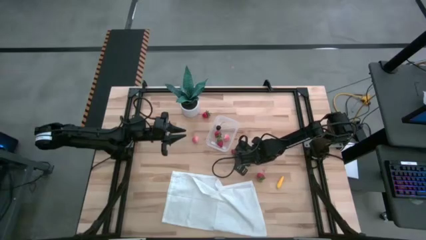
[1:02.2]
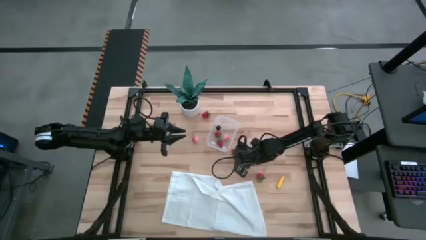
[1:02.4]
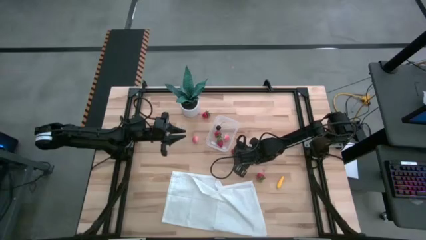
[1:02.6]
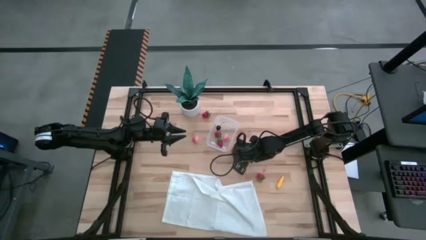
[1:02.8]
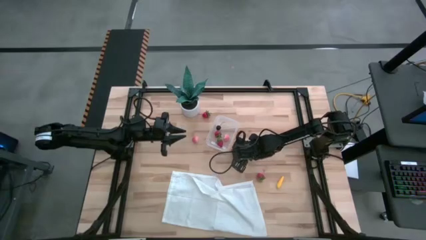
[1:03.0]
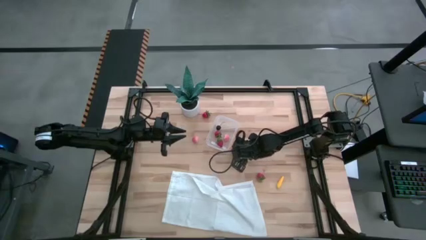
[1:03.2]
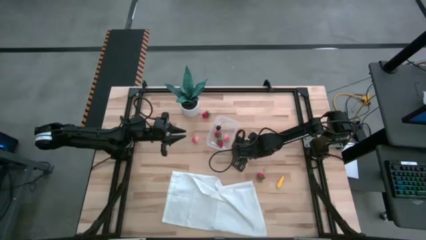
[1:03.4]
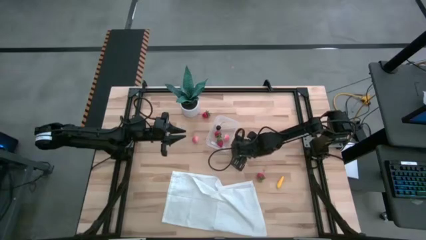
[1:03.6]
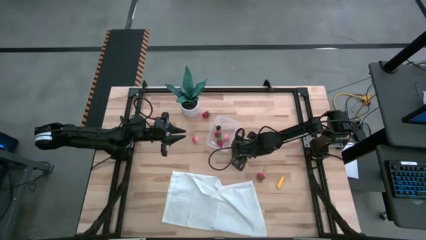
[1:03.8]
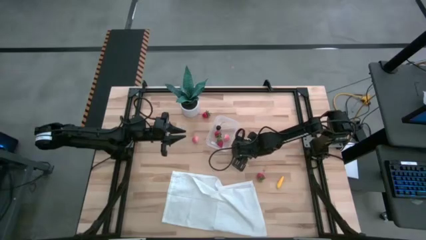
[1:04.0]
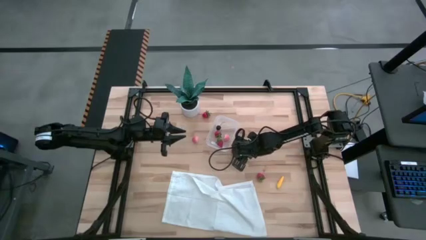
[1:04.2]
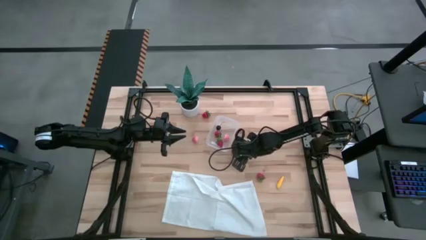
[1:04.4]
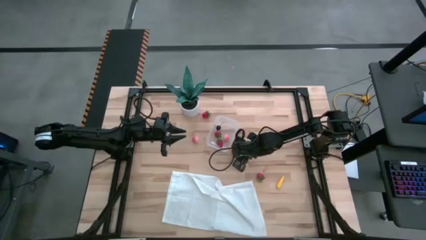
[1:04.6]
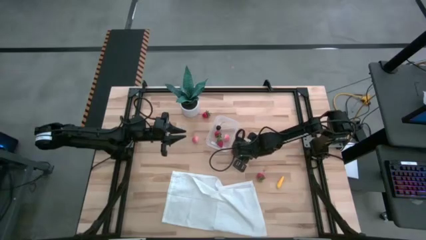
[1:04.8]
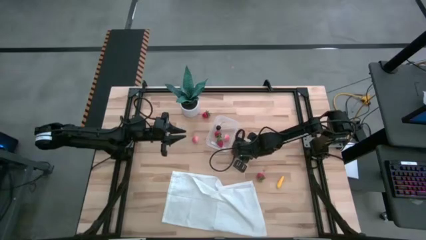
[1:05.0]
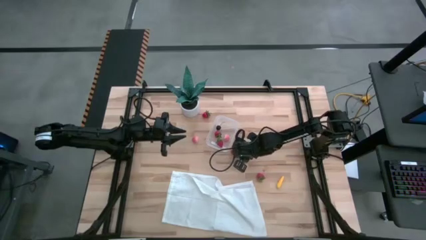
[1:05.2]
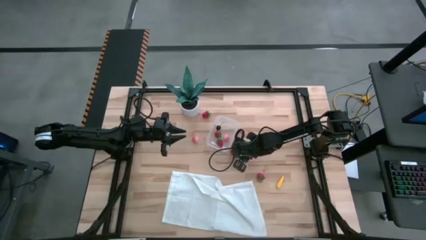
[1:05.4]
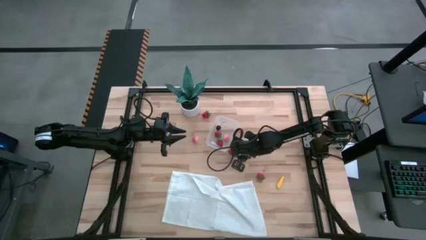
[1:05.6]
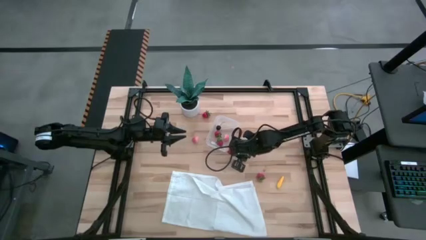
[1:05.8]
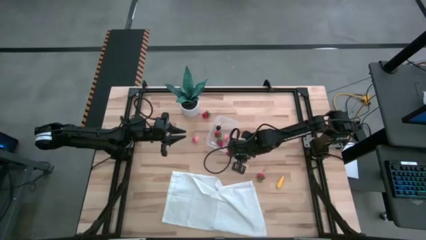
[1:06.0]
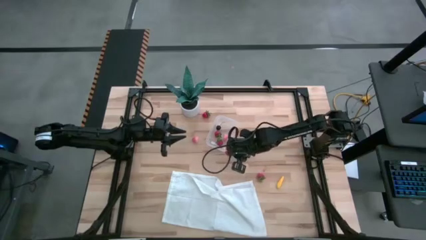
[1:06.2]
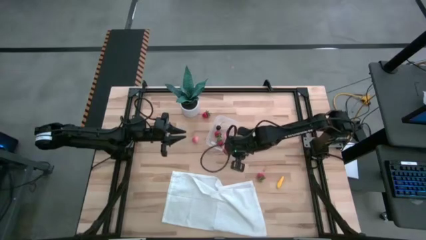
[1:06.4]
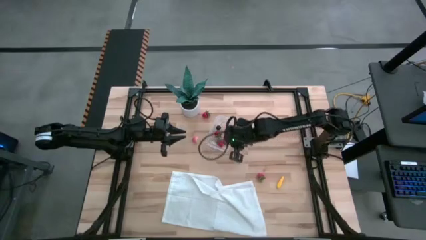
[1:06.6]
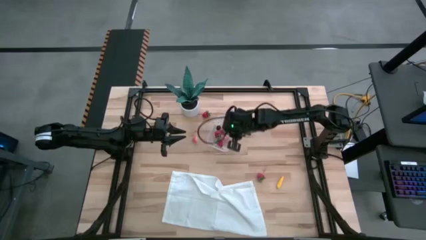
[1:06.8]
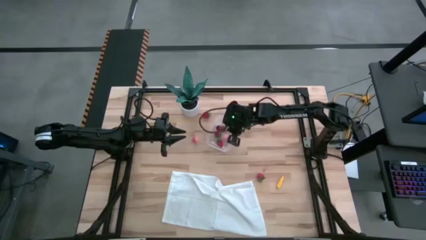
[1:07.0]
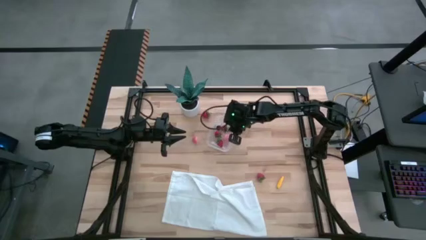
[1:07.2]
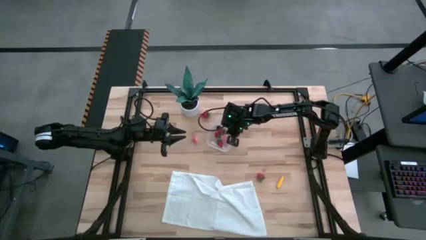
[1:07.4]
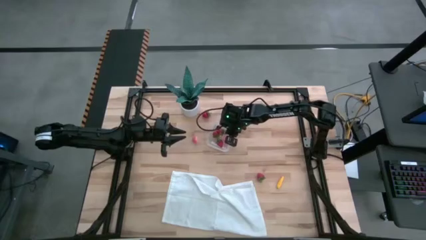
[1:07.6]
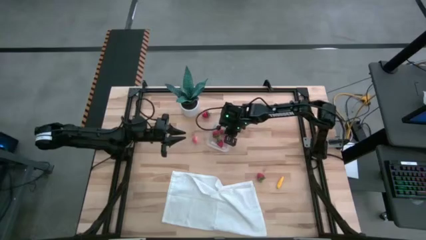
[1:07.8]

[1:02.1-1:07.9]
Task: Pick and placing Produce into tupperware
Put the red strawberry into the transparent bin

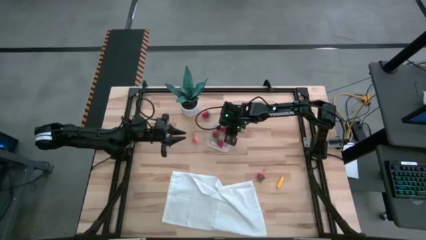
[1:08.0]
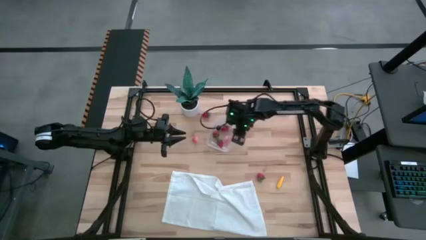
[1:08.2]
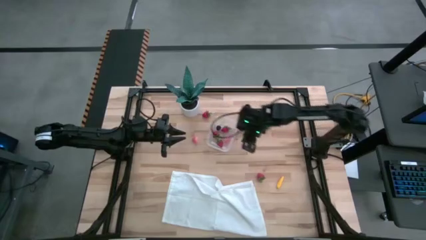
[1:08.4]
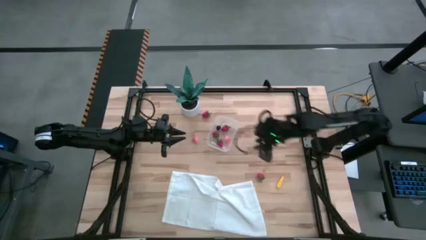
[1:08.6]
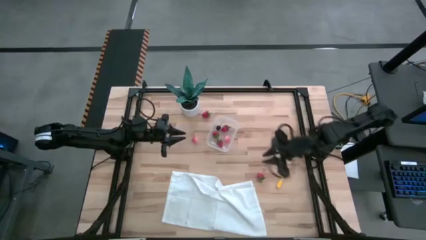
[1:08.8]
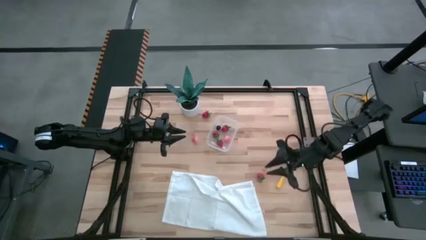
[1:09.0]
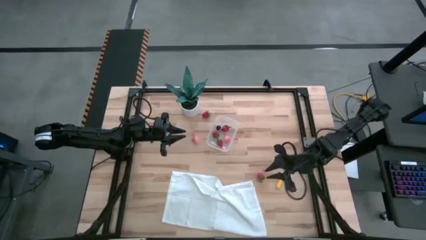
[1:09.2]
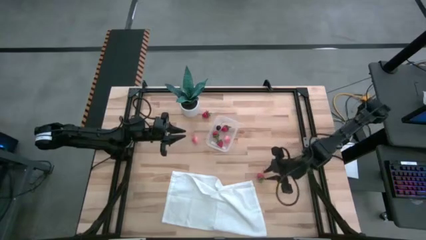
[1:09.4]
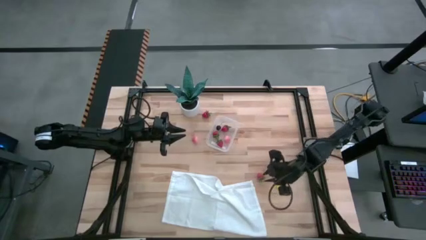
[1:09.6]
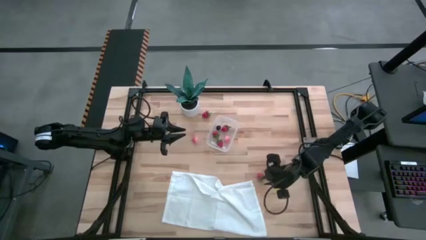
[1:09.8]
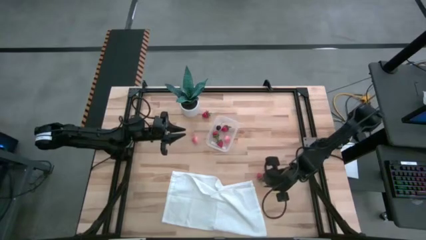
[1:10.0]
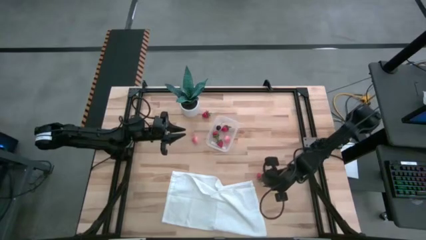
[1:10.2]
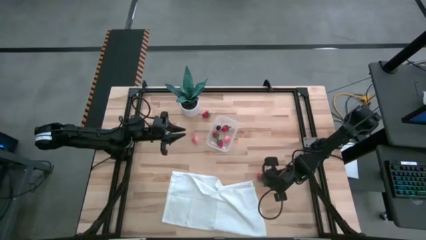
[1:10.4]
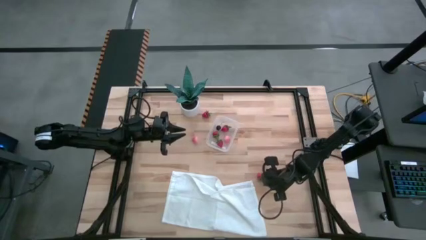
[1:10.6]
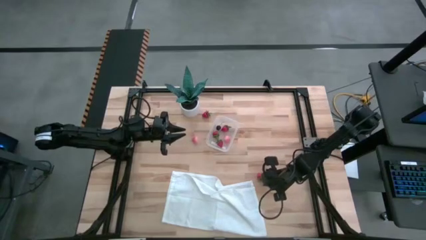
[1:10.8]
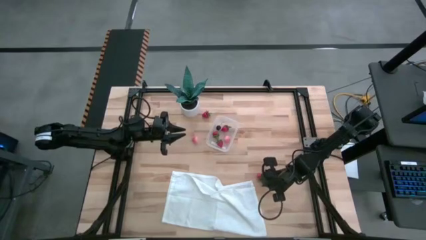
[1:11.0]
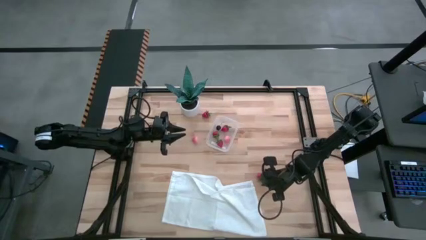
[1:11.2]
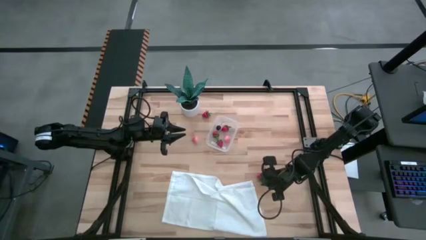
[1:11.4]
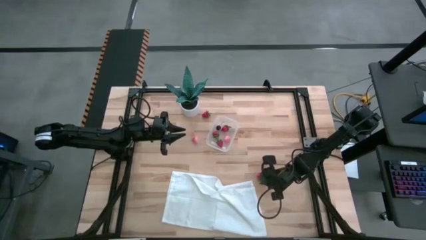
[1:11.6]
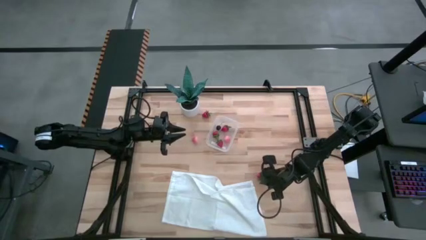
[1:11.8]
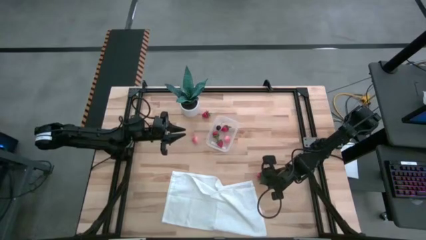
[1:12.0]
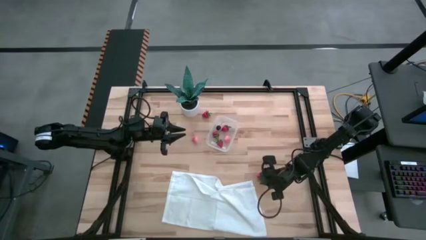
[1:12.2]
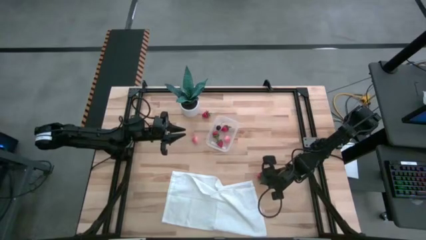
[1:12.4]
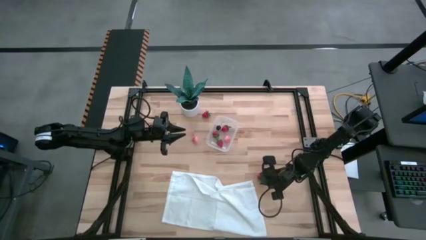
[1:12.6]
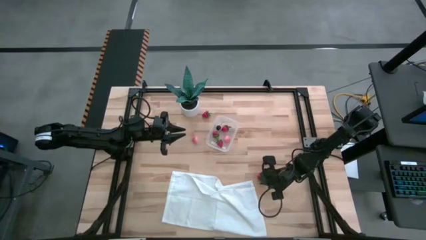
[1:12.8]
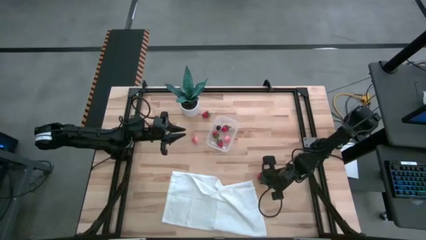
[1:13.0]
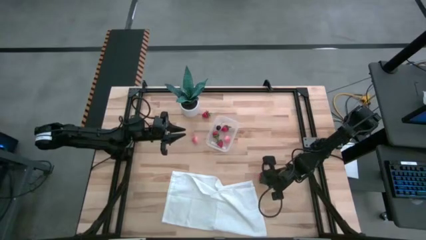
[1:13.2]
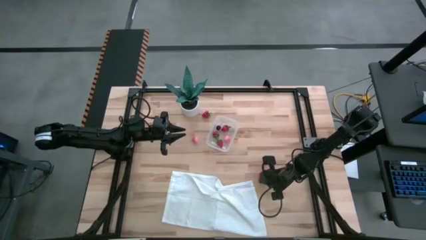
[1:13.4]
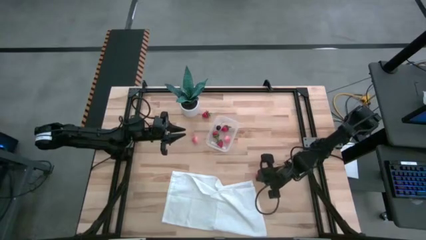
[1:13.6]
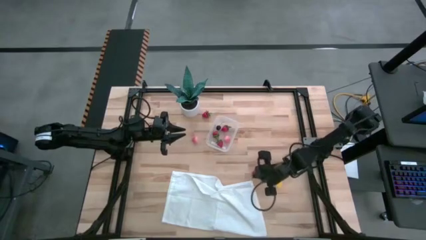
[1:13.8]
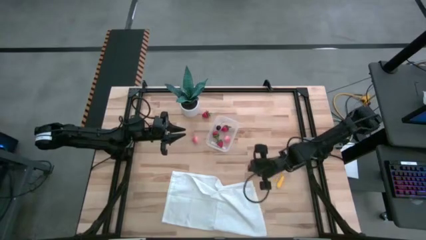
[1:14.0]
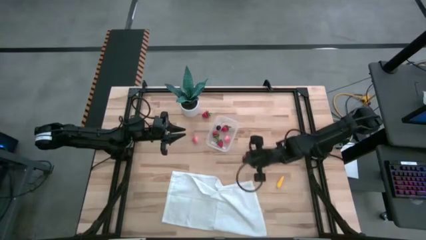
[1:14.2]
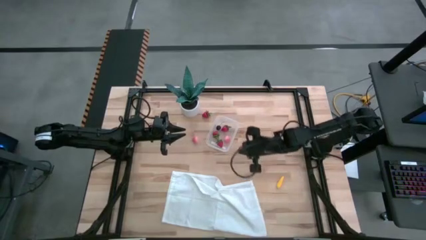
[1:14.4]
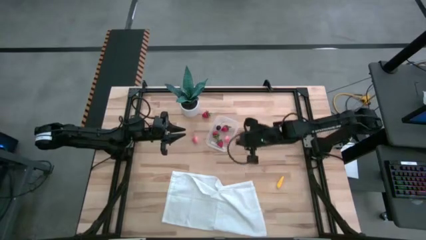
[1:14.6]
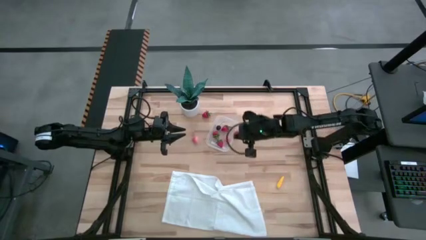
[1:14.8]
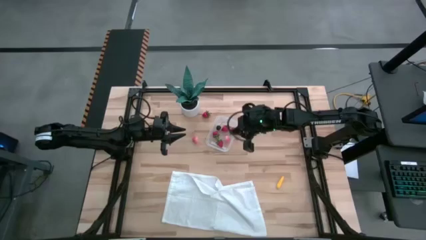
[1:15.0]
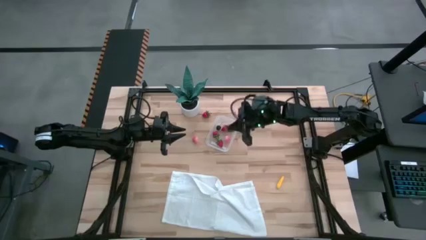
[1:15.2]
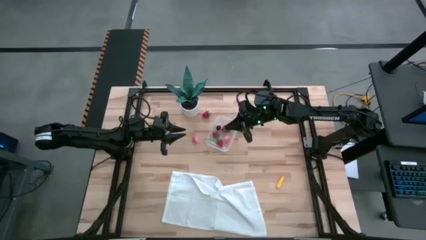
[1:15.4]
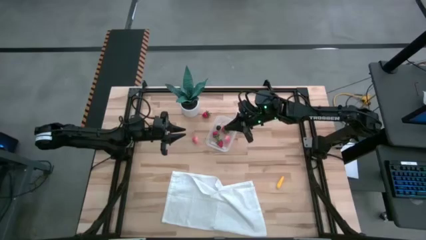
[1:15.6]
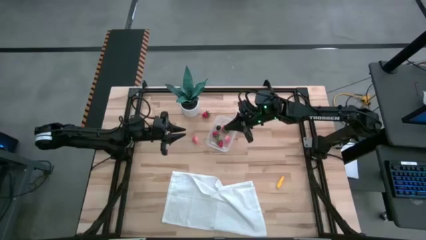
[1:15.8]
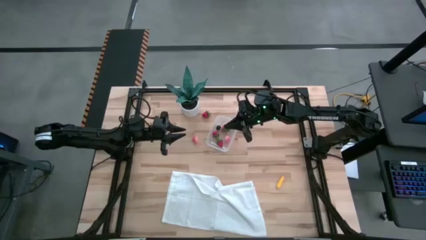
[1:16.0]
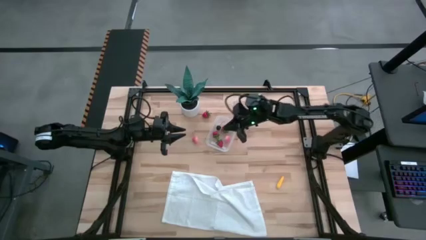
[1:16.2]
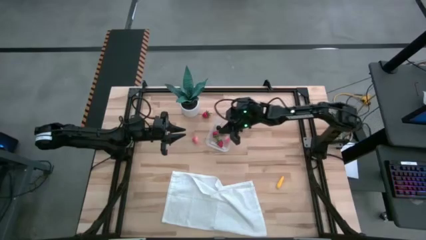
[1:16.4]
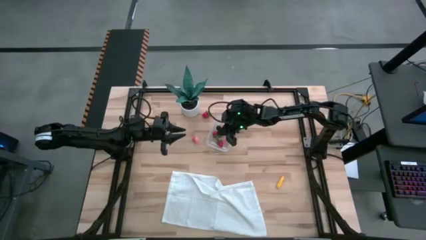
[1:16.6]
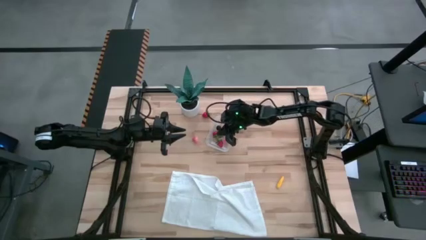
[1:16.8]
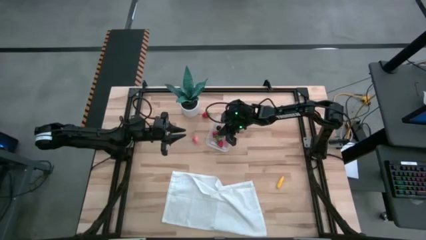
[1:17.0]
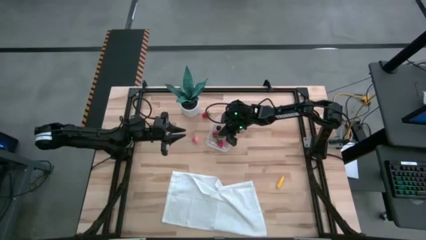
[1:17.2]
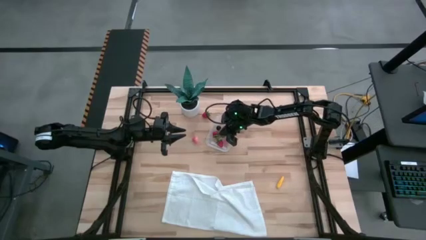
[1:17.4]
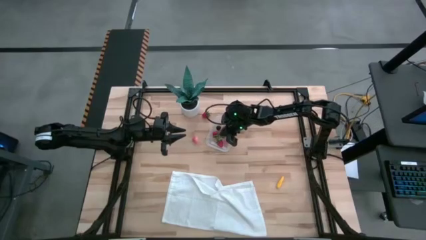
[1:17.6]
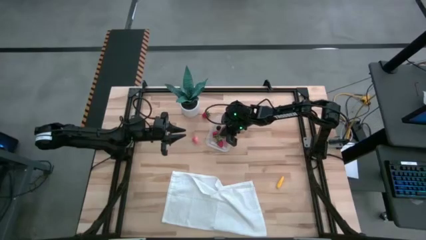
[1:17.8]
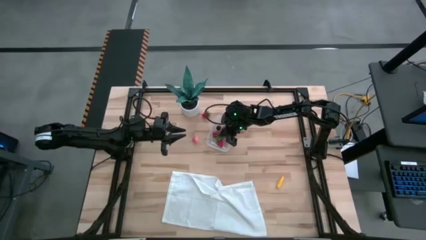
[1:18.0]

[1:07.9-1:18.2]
Put the red strawberry into the transparent bin
